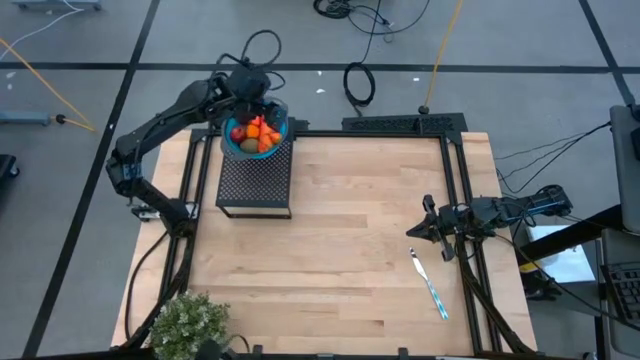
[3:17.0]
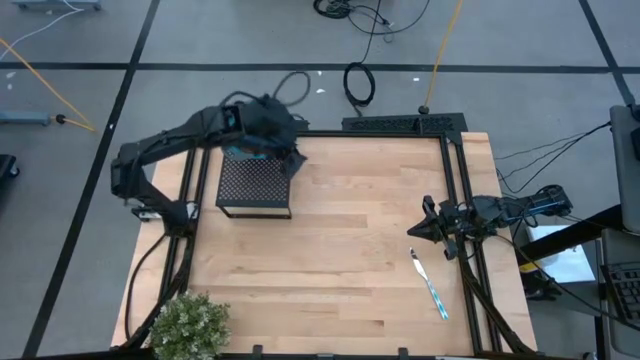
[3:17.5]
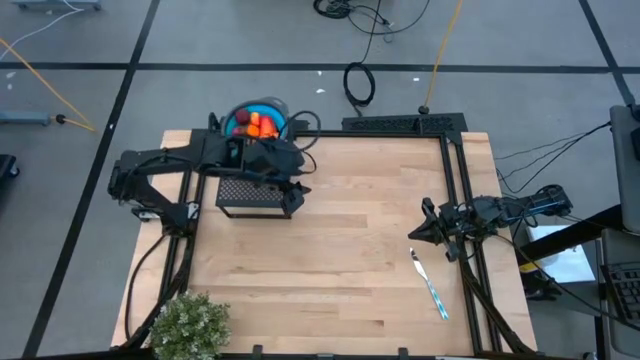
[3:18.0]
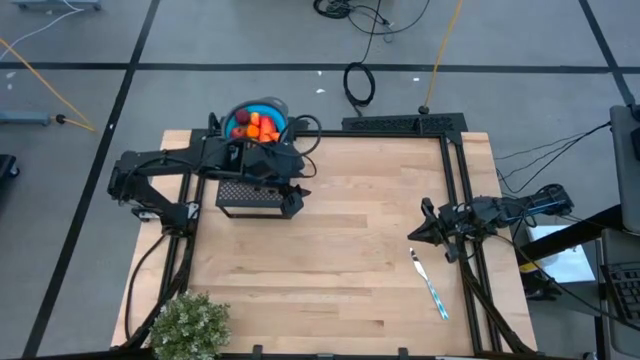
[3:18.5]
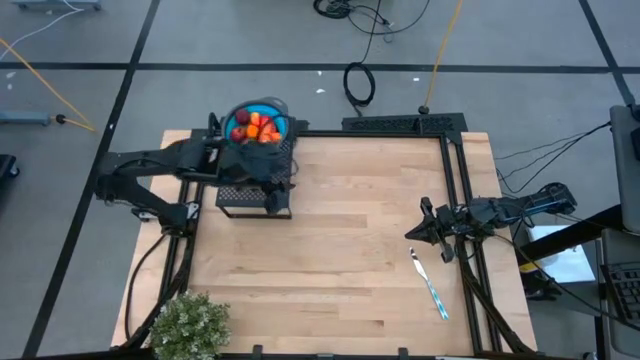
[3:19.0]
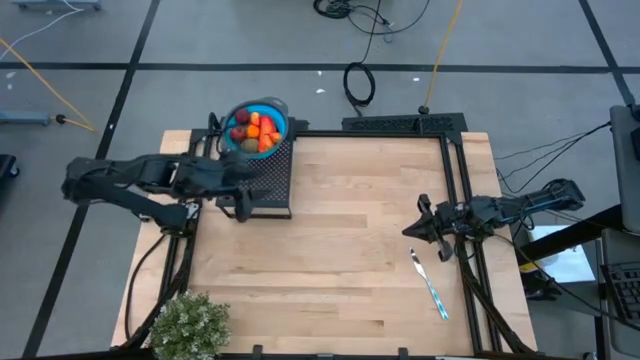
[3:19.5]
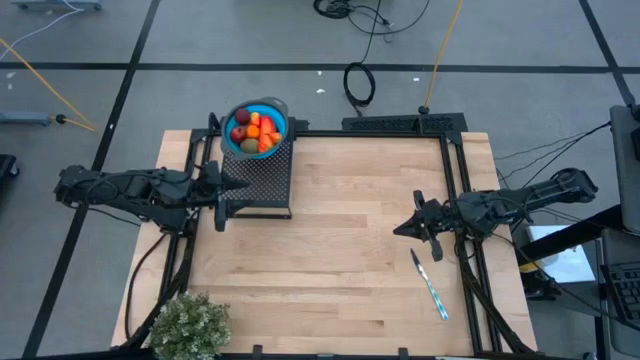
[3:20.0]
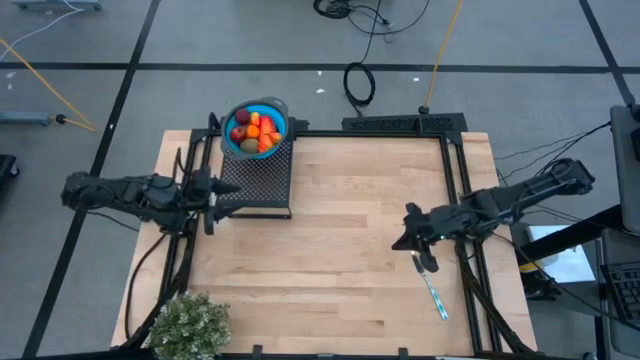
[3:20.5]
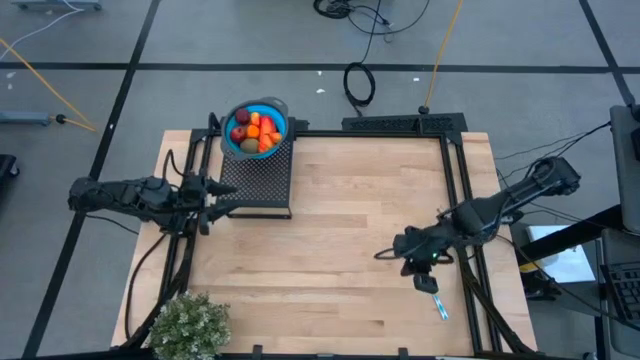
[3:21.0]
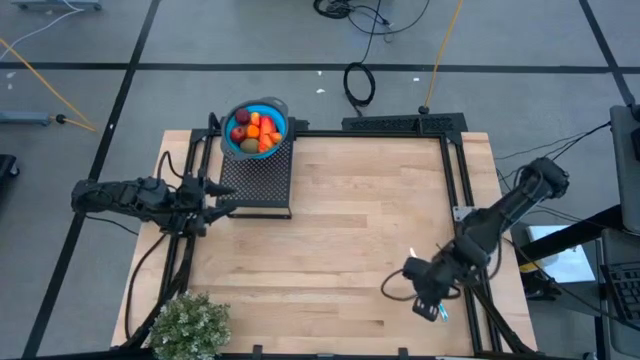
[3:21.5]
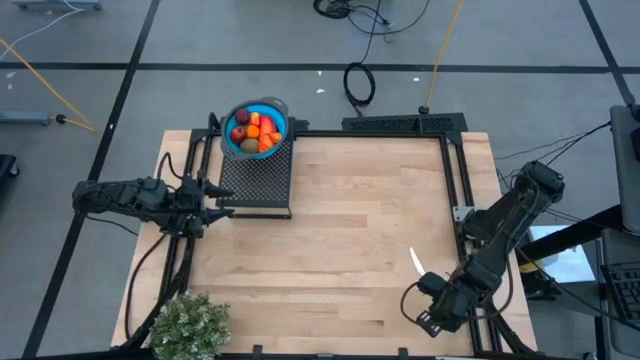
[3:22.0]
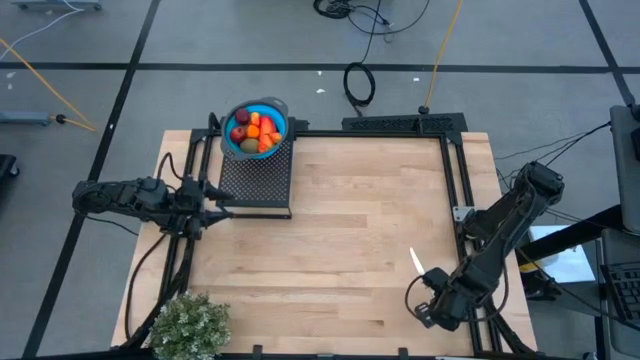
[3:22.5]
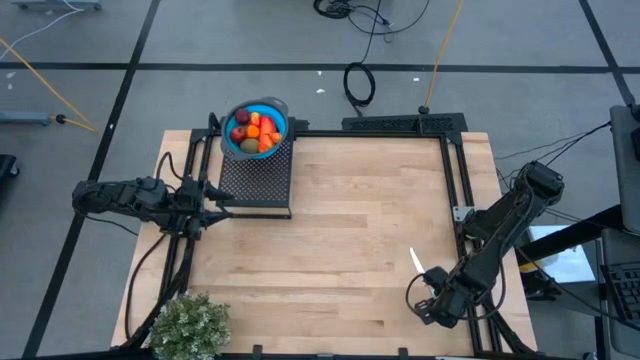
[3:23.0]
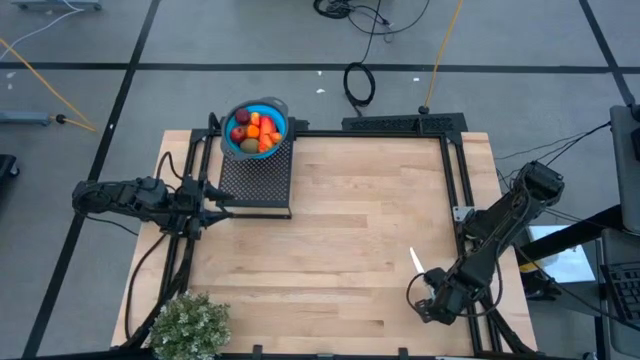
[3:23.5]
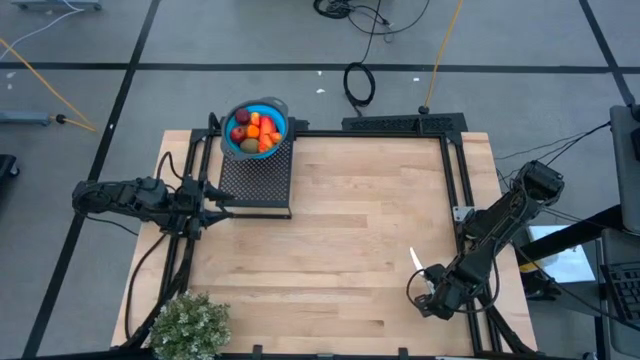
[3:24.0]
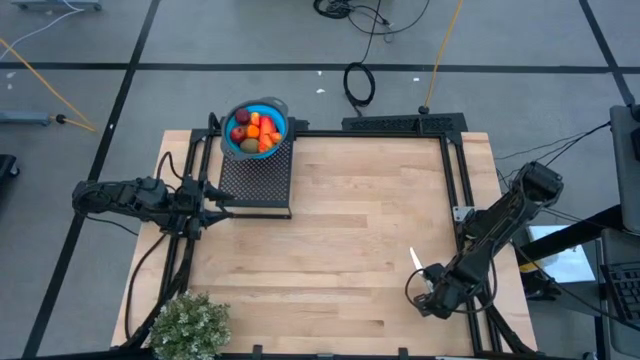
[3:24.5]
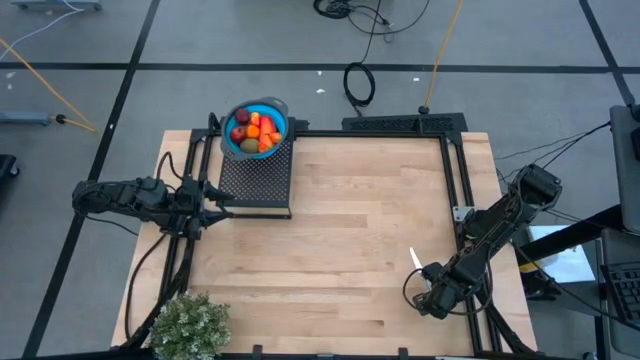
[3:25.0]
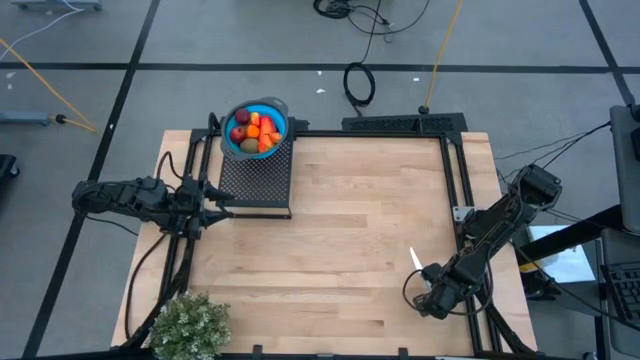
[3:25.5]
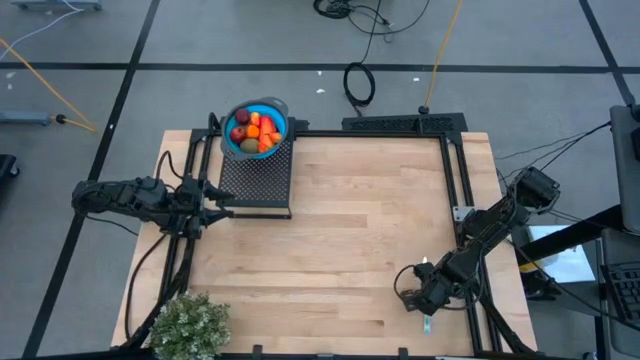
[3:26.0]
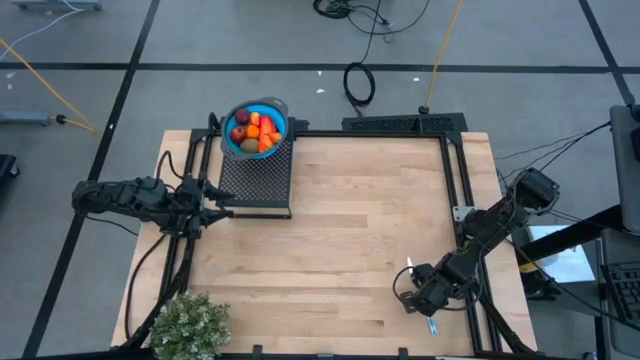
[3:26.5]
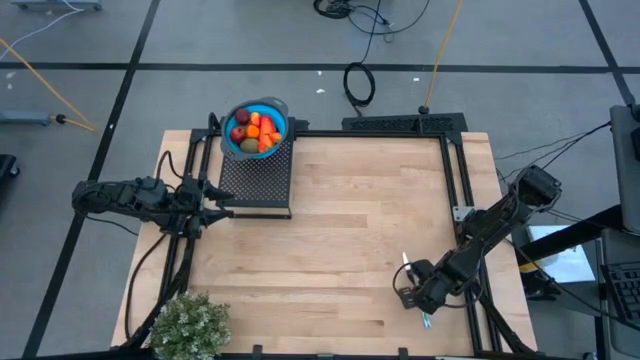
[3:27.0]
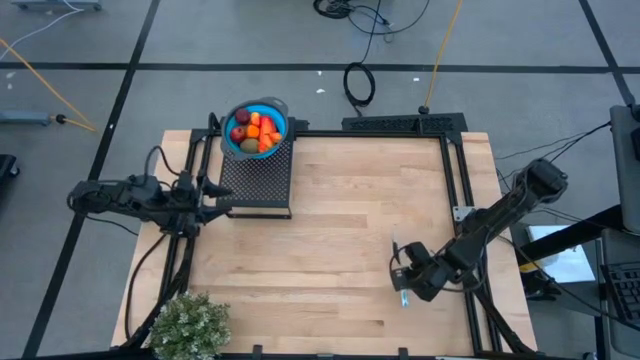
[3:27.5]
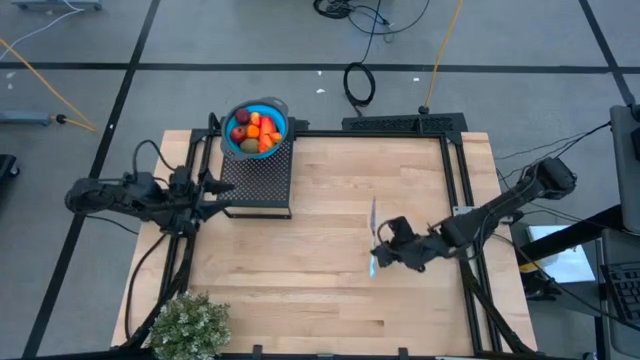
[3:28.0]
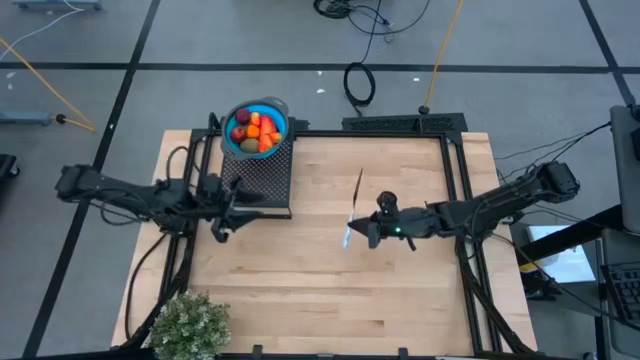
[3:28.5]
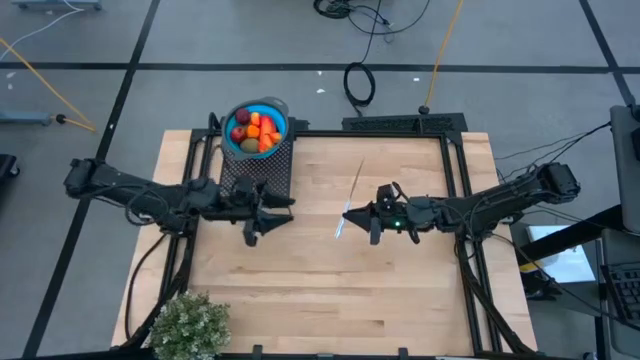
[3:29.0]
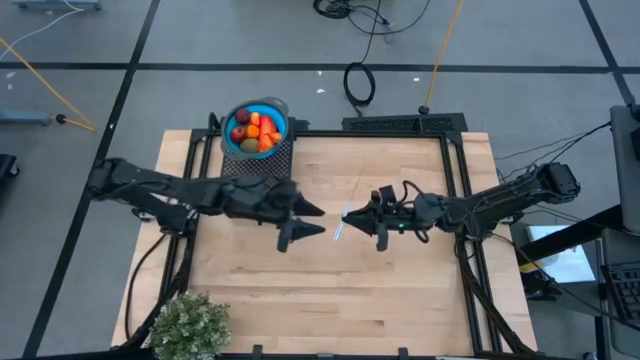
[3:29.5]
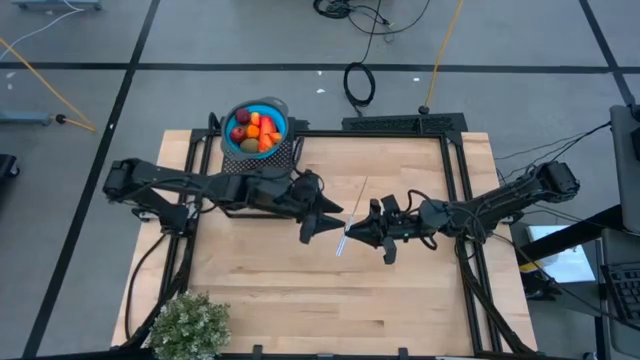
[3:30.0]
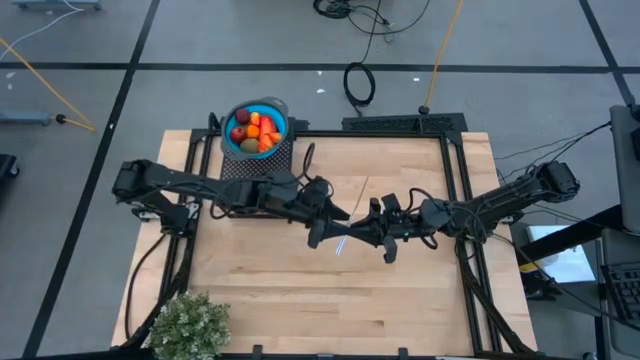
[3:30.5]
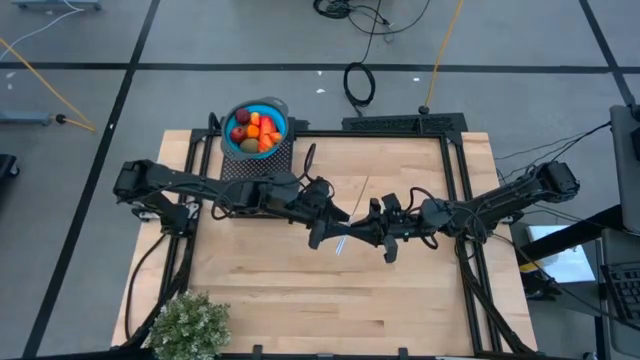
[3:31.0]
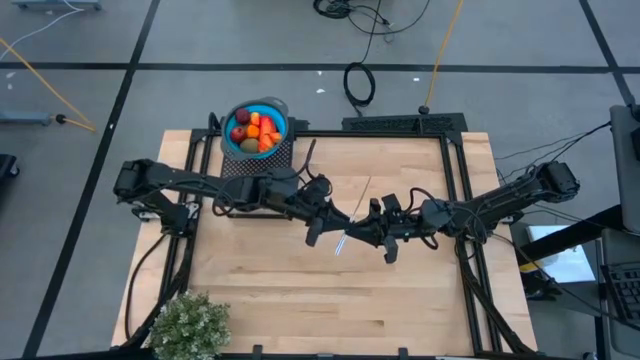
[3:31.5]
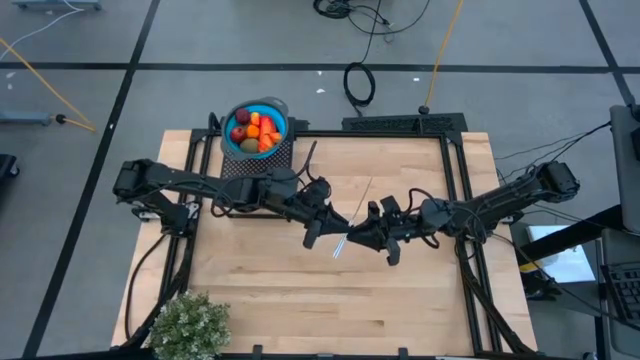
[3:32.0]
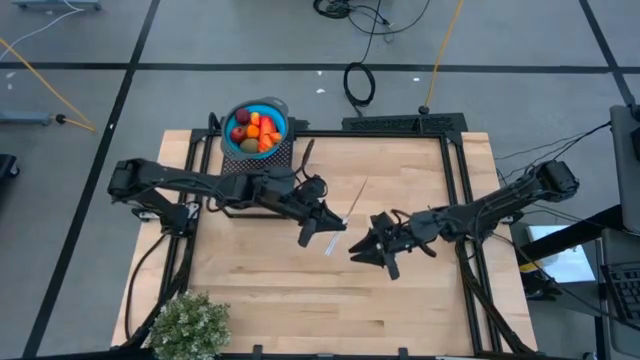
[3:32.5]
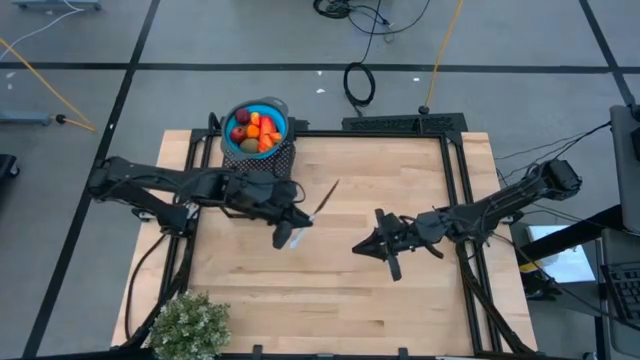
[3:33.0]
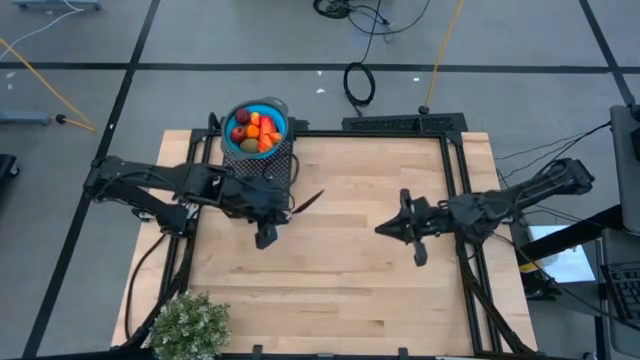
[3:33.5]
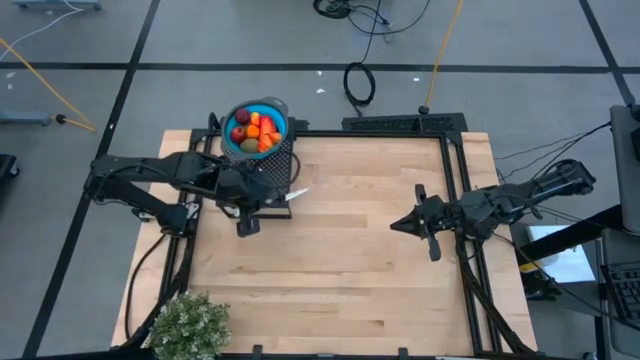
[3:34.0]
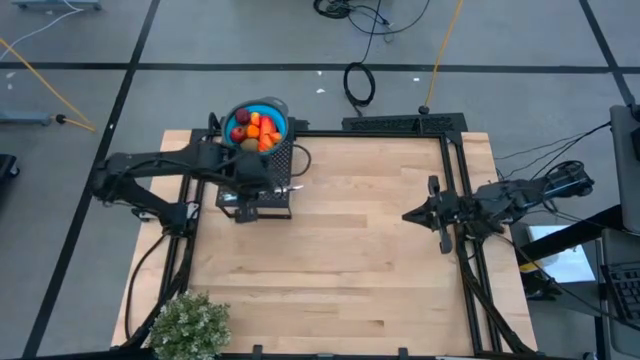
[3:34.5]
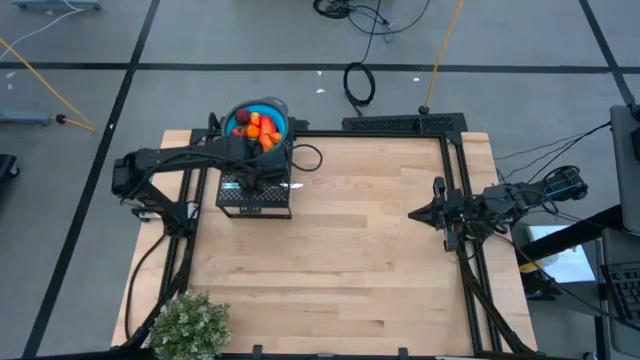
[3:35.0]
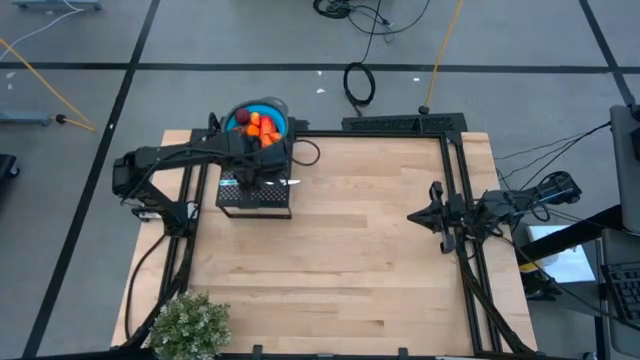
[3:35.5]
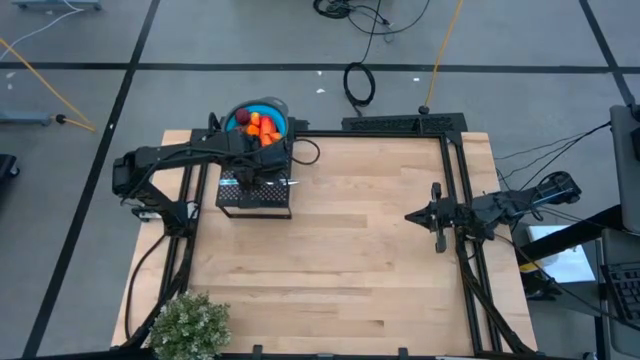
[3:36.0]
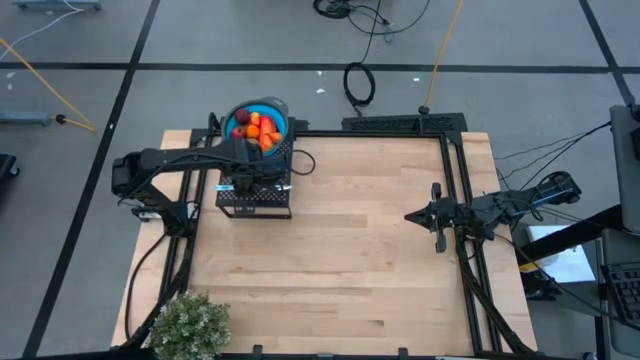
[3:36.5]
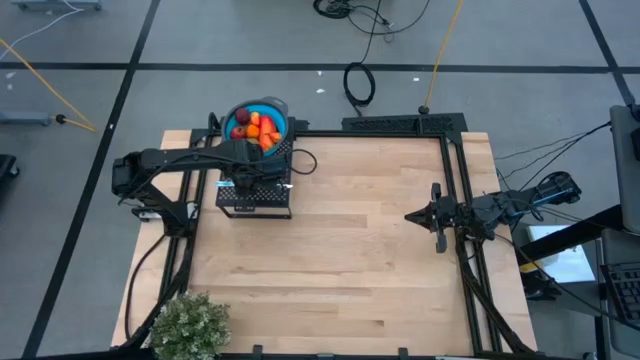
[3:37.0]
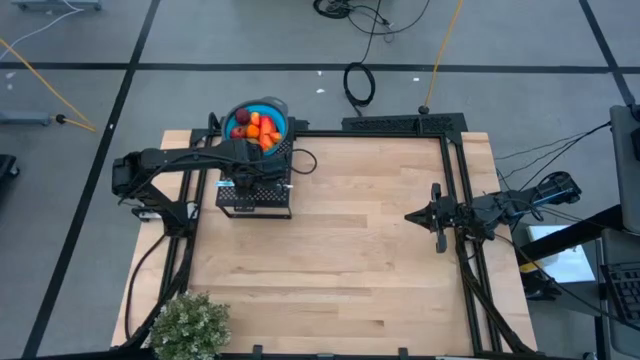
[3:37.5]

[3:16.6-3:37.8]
Task: Pick & Place Fruit
Put the white blue table knife on the shelf
